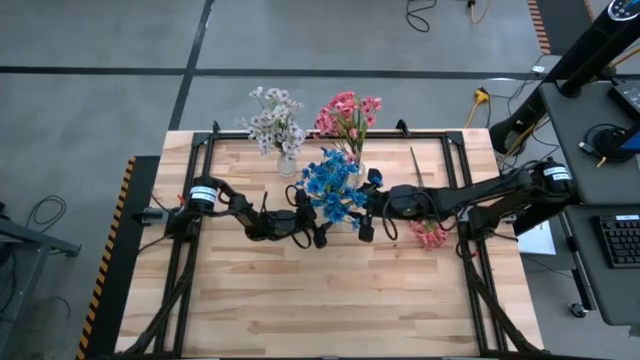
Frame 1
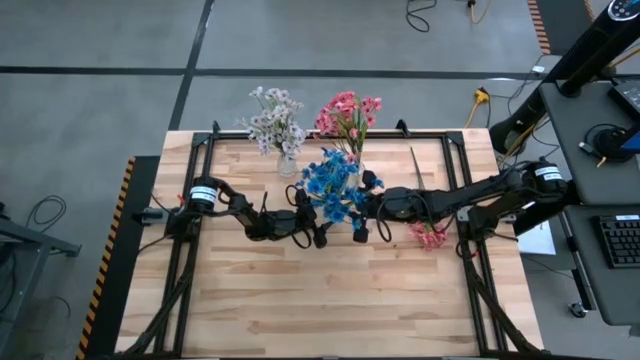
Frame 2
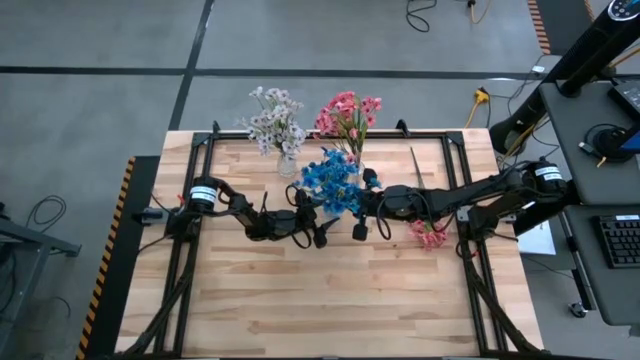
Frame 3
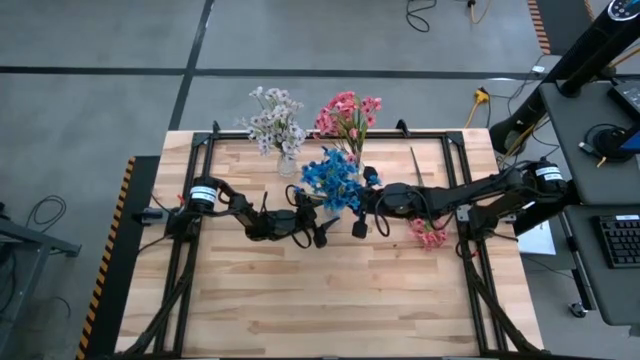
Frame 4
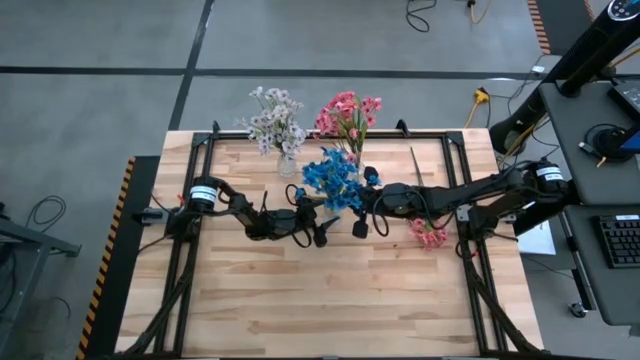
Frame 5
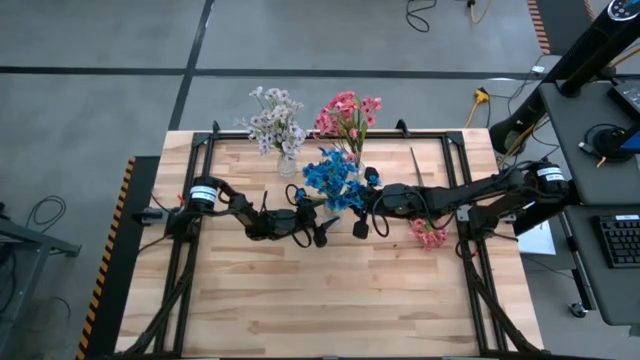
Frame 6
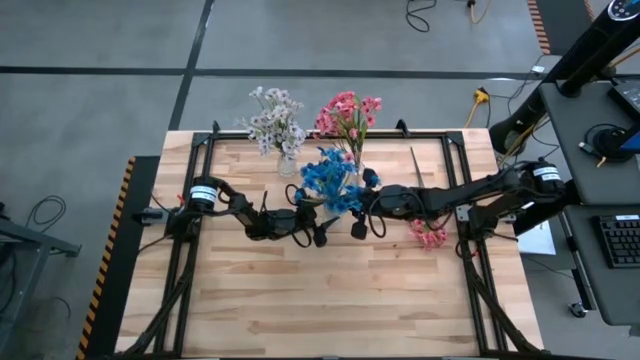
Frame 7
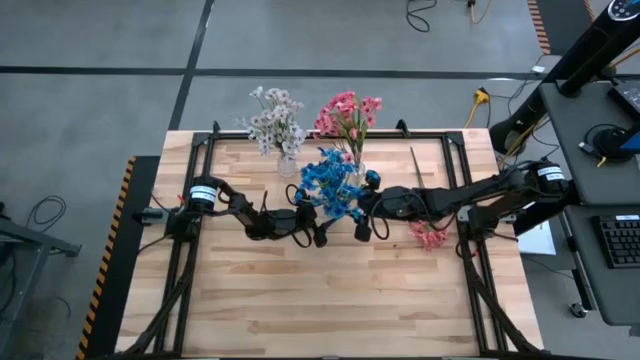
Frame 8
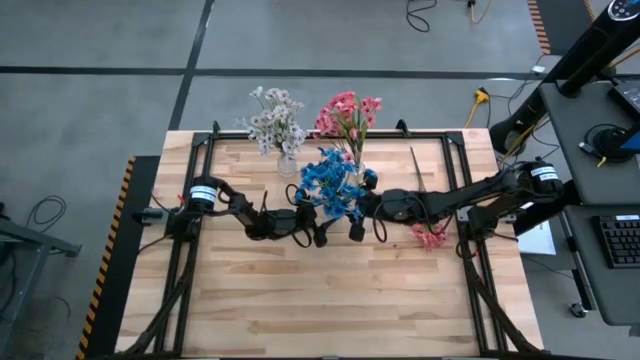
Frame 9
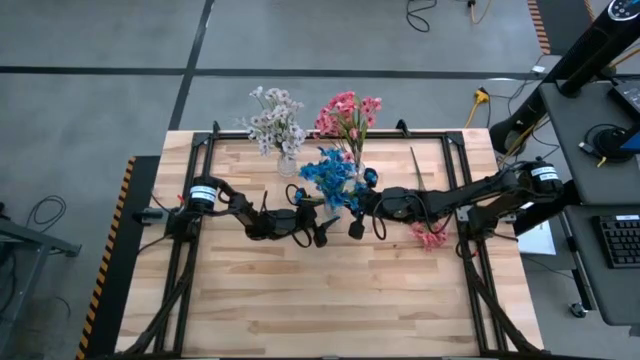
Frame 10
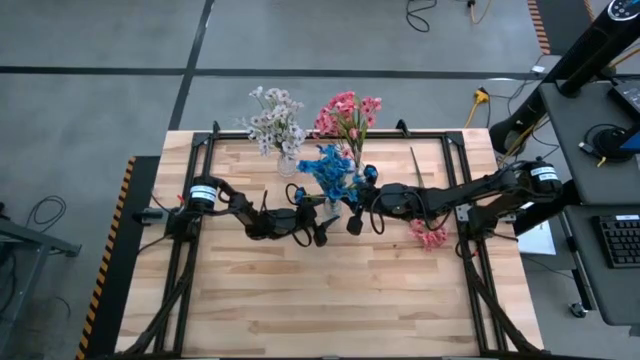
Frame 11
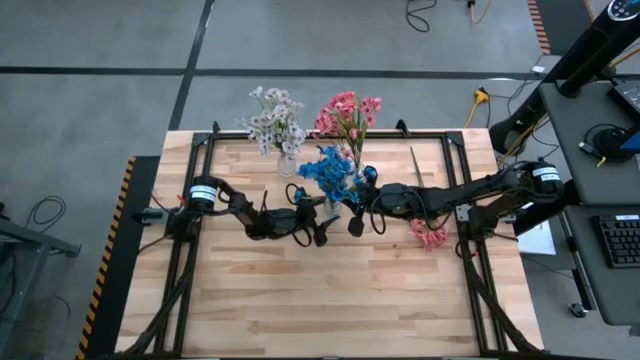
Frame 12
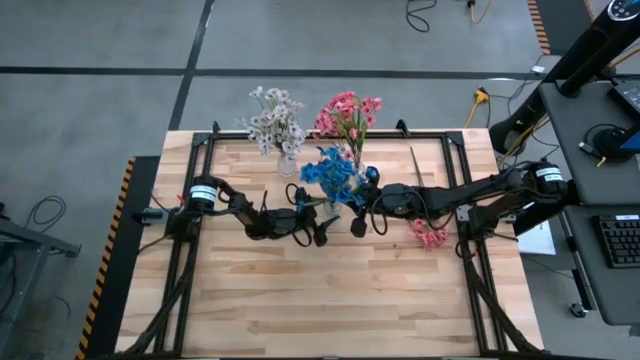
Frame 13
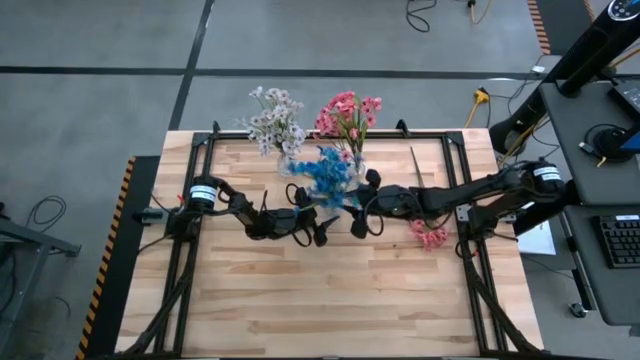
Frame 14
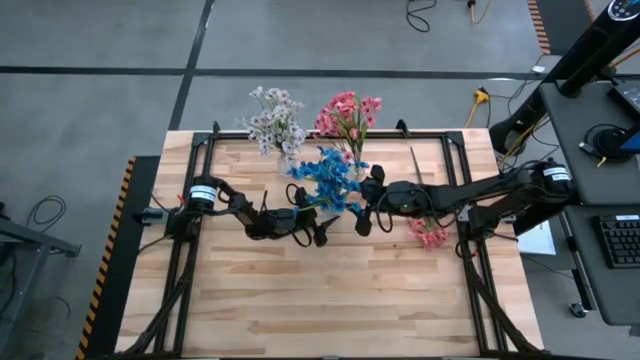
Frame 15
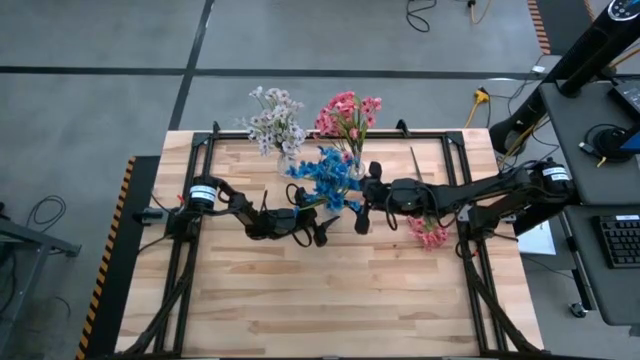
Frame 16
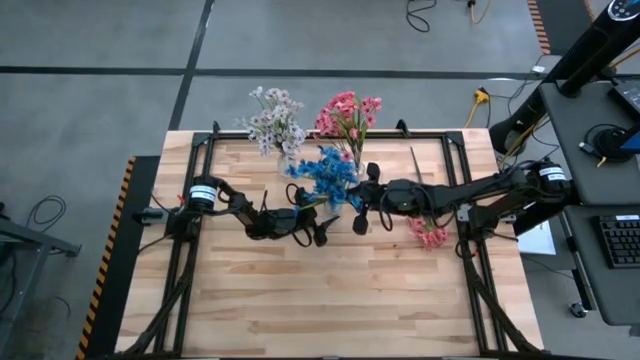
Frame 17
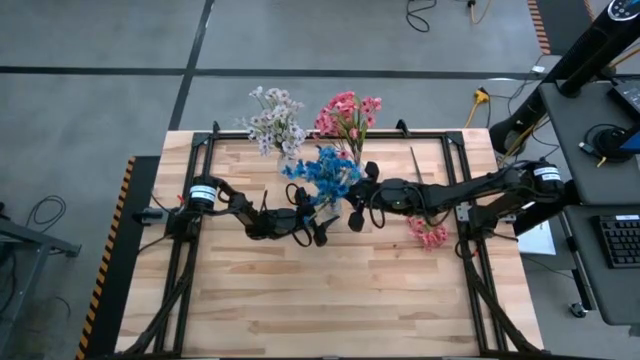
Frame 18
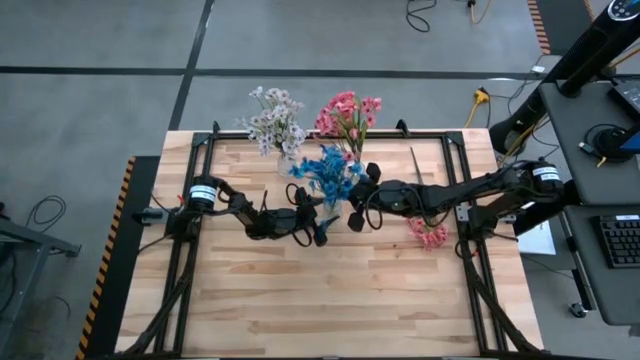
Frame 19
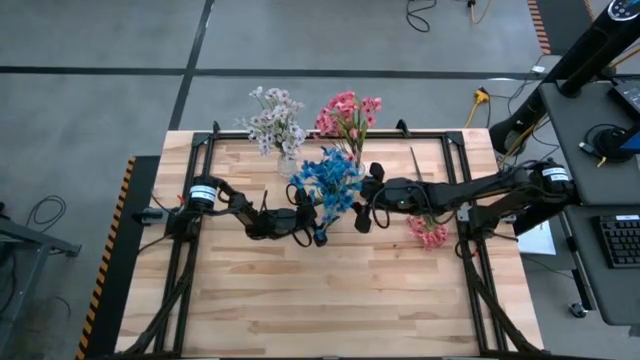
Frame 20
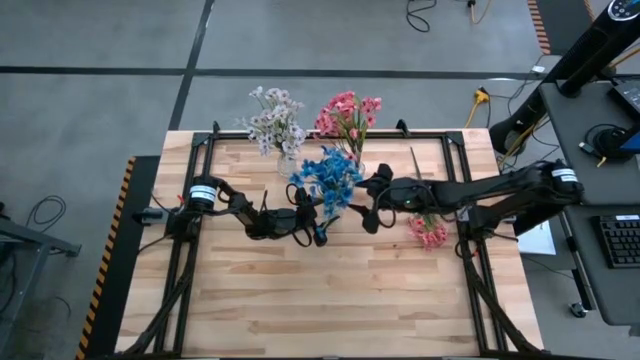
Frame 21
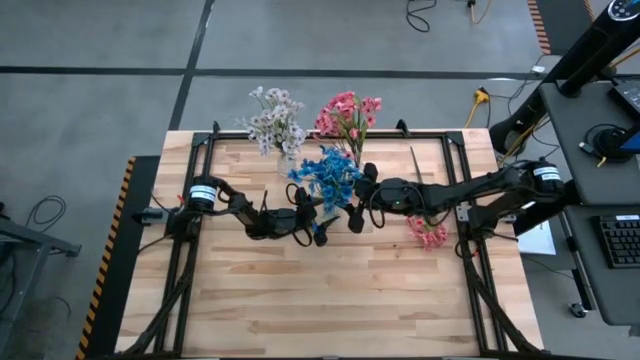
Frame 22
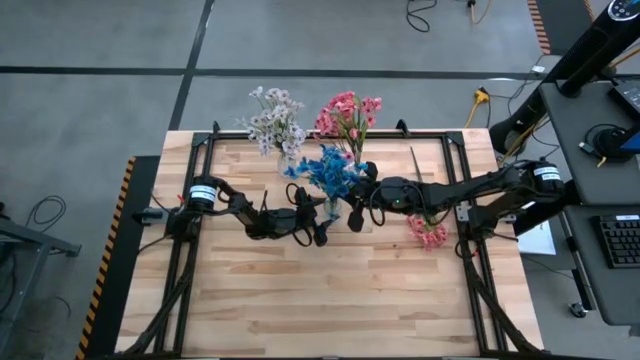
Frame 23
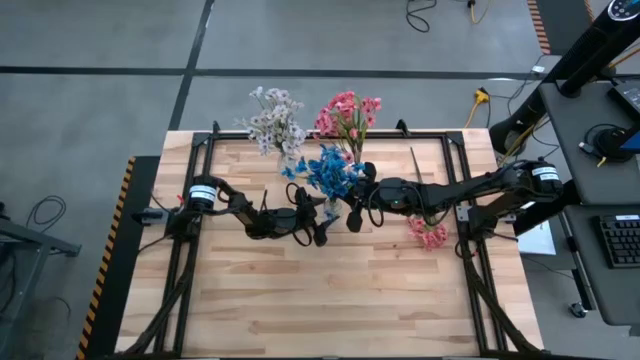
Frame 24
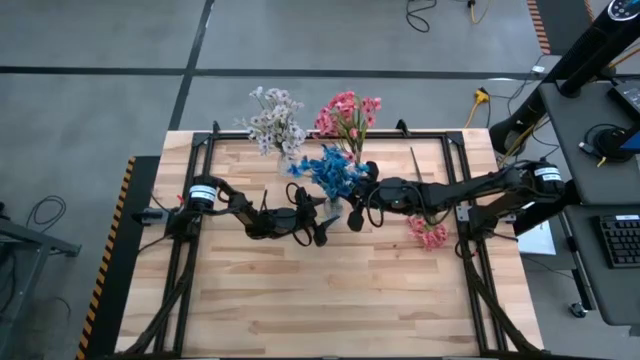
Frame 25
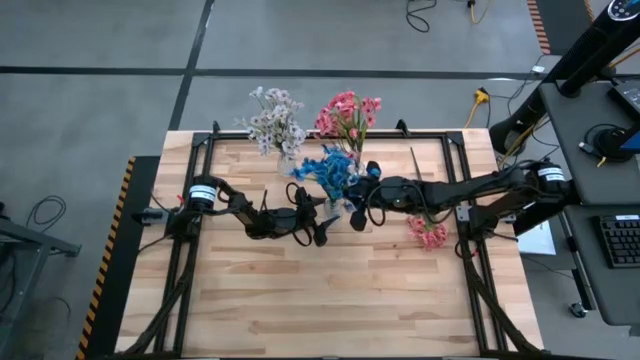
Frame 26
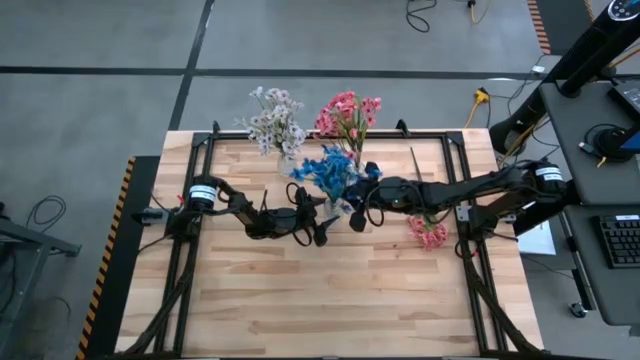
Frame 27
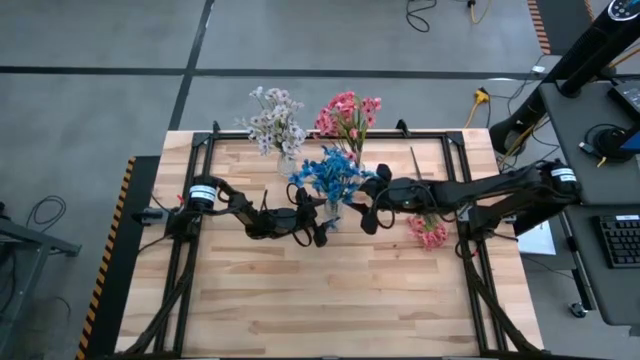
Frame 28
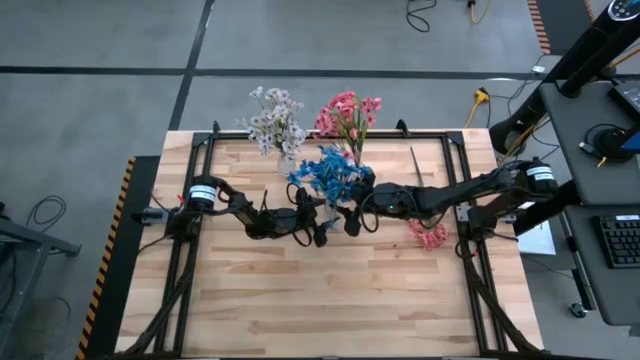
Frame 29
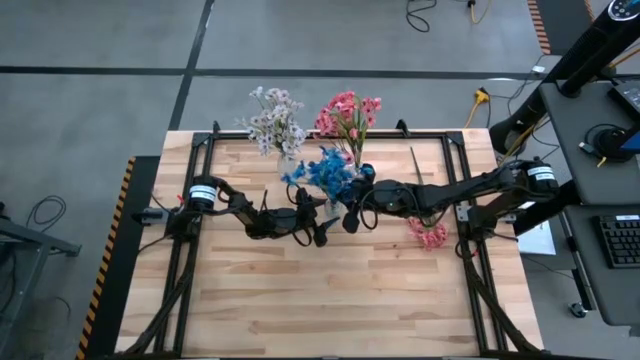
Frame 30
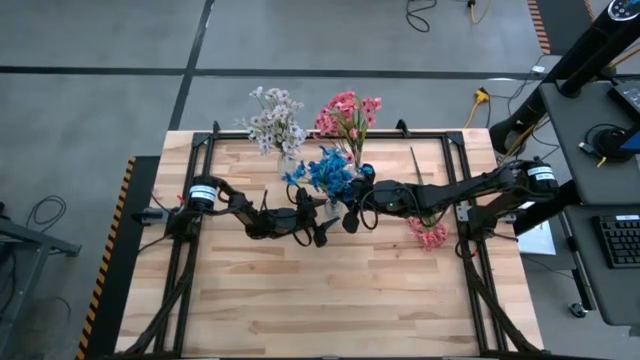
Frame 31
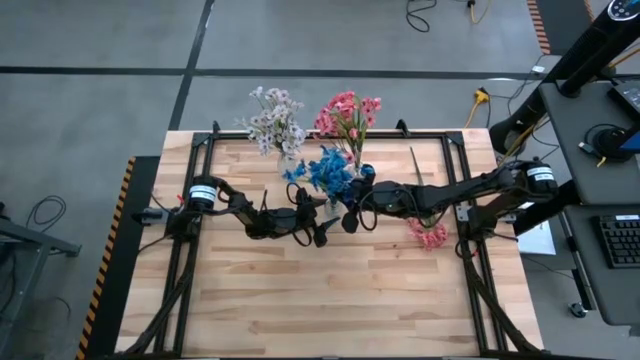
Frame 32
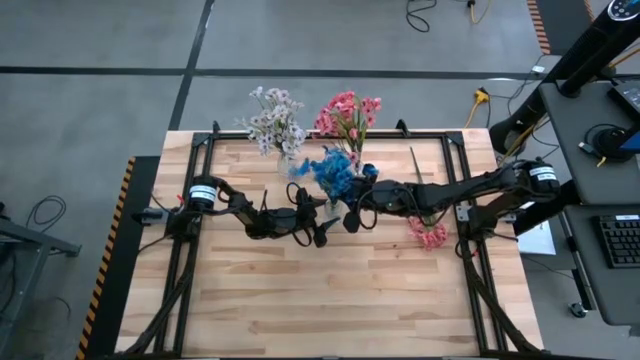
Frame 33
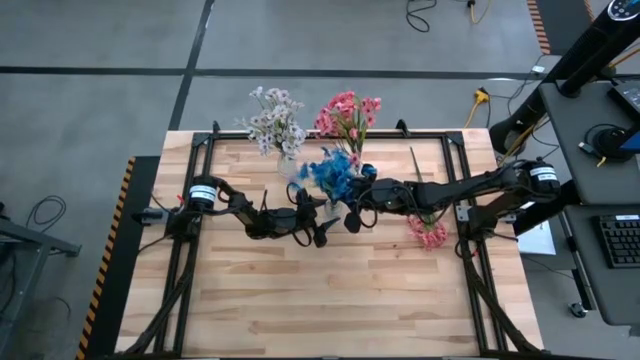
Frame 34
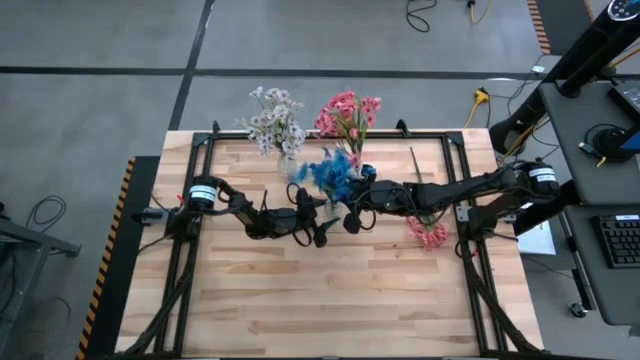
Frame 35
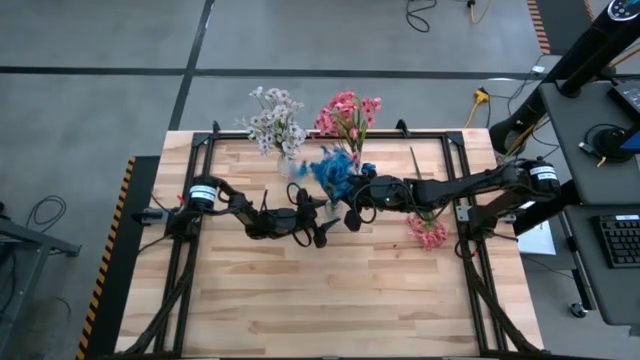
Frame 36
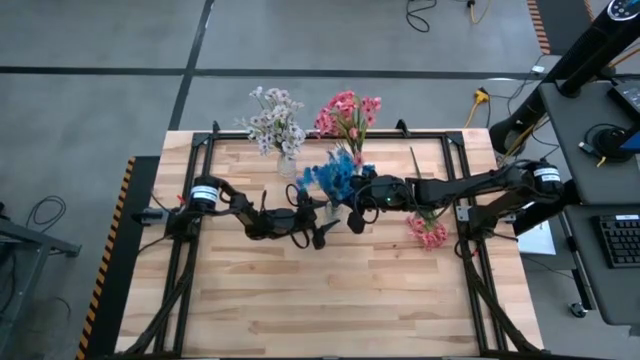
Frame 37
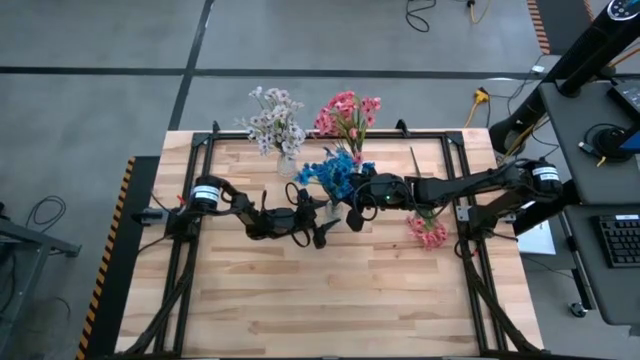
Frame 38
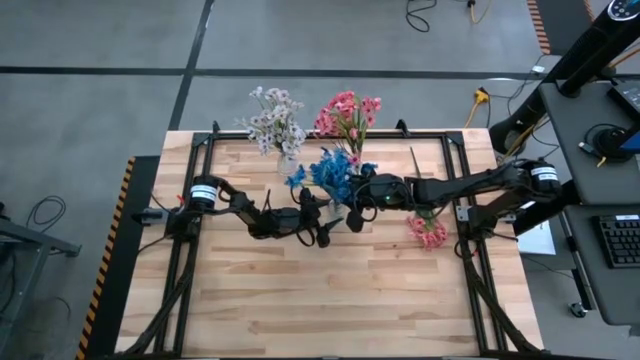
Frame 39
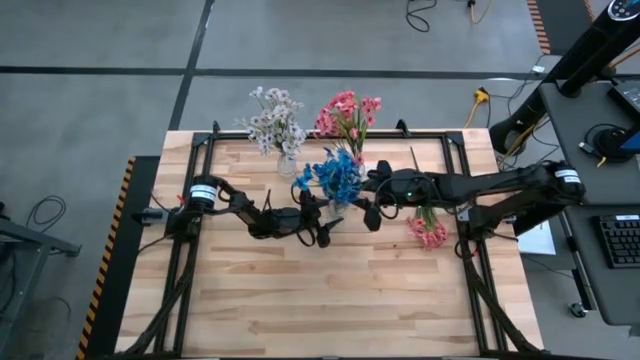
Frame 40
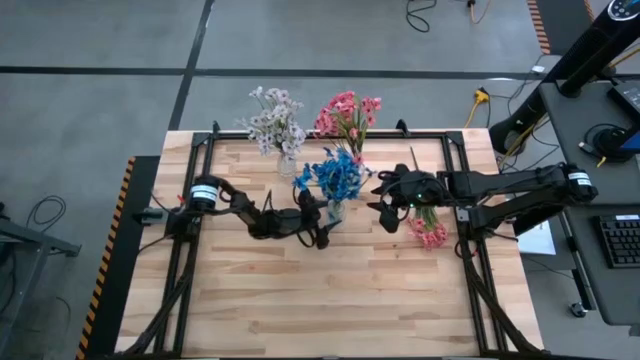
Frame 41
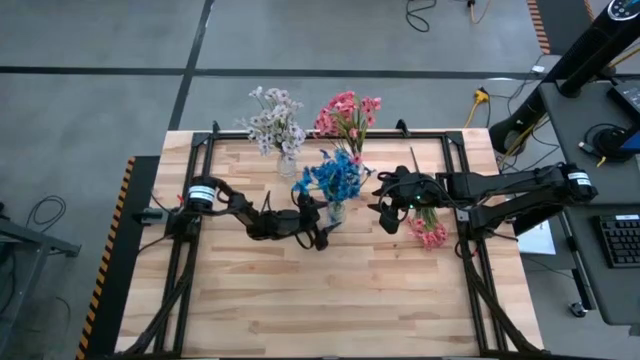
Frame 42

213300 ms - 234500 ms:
Task: Sort flowers into vase by color
Put the blue flowers into the middle transparent vase
